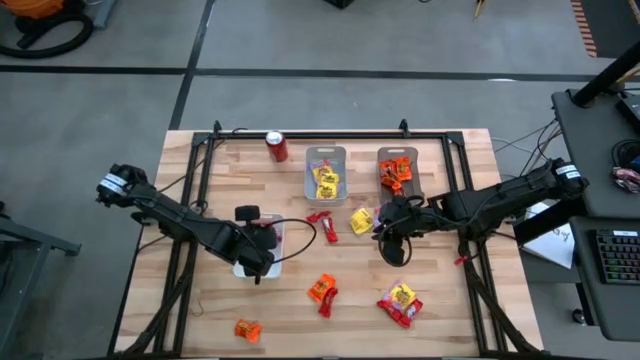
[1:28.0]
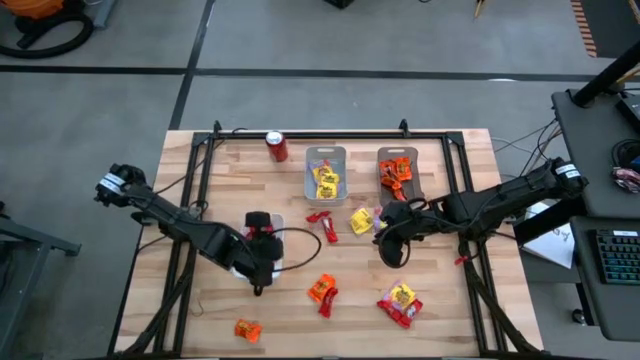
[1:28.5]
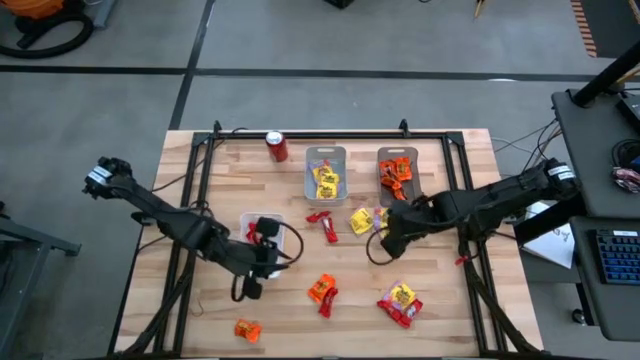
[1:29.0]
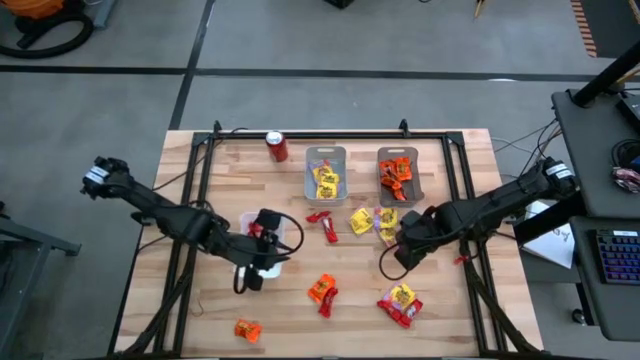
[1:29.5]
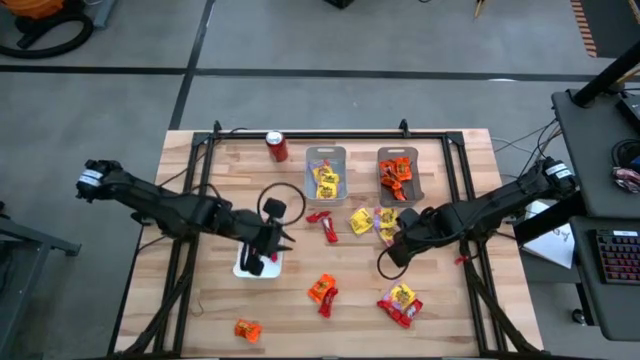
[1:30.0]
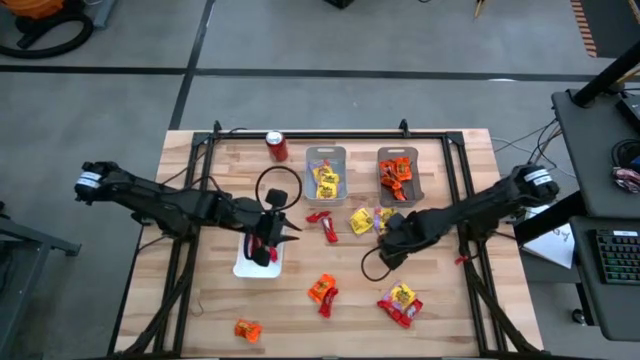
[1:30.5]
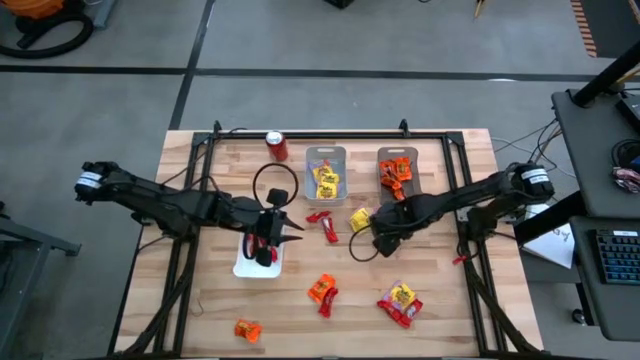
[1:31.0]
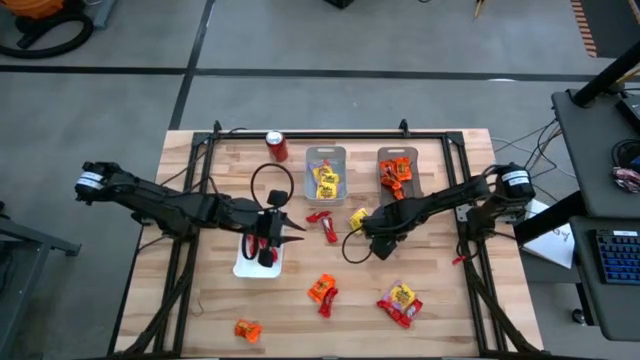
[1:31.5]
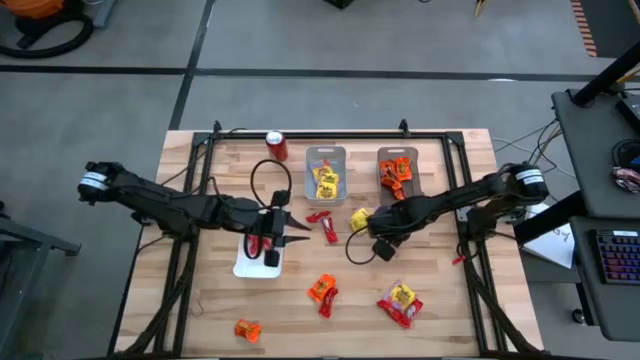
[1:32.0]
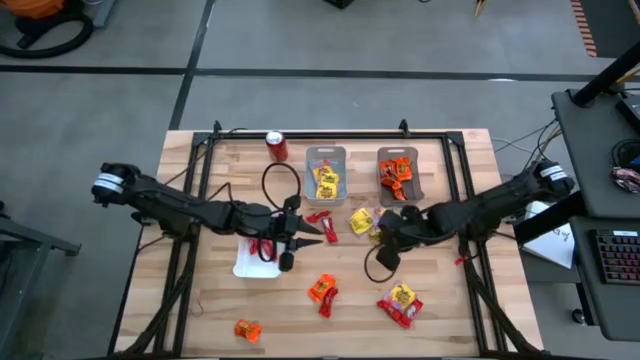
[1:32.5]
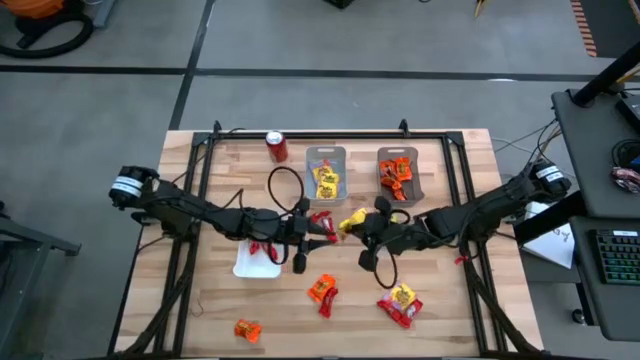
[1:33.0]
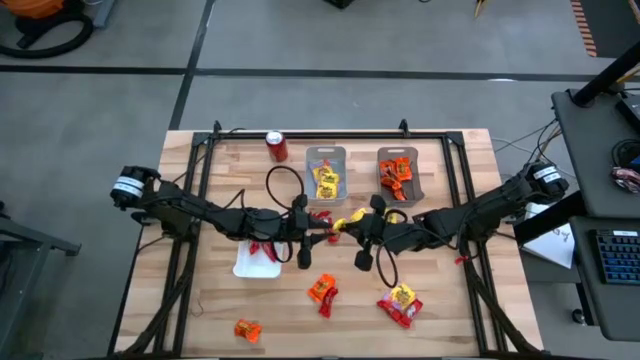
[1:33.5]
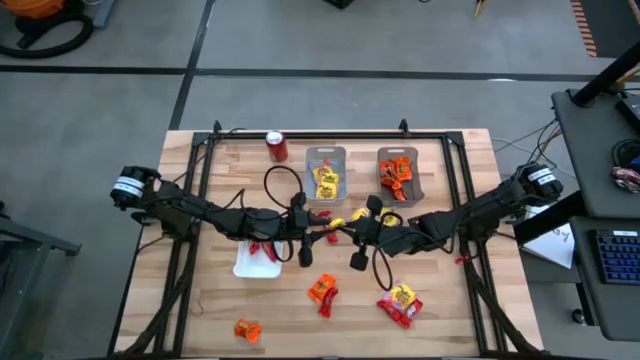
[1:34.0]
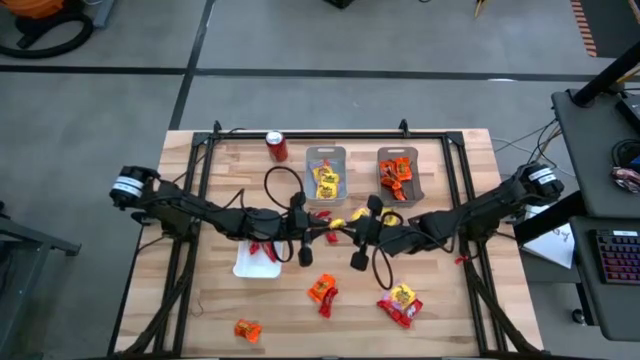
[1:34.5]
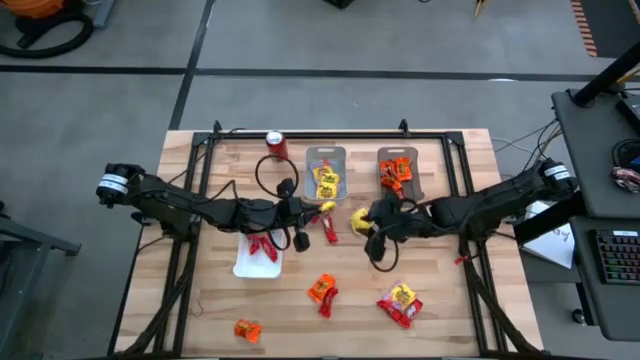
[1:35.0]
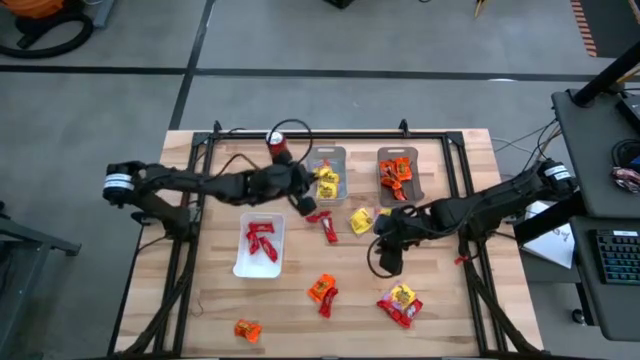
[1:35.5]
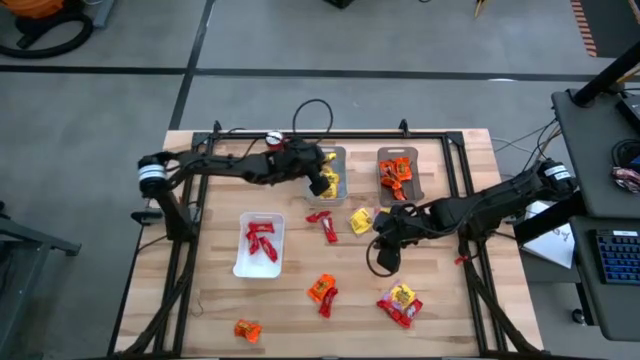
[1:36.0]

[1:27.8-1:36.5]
Task: Sort candy
Put the yellow candy into the gray bin

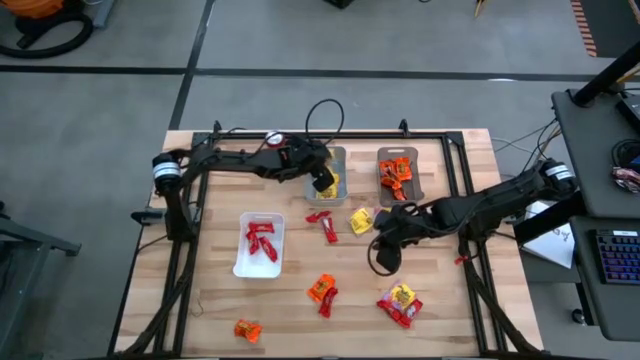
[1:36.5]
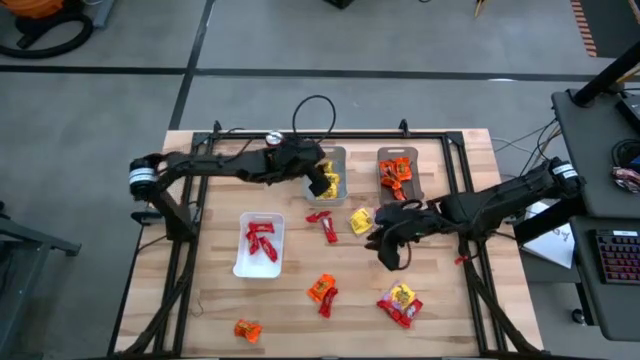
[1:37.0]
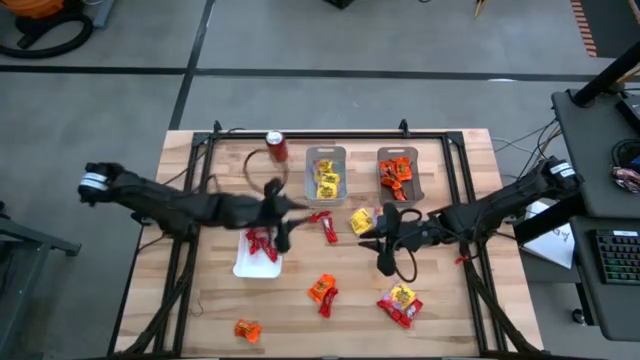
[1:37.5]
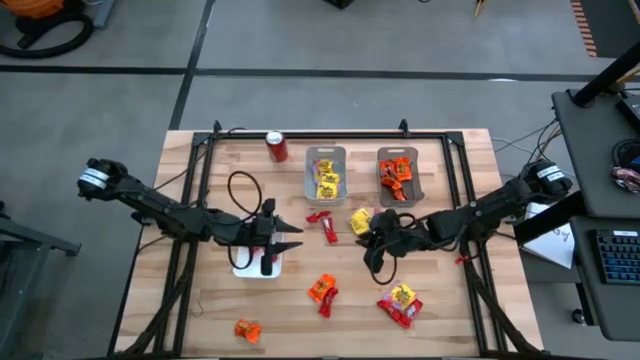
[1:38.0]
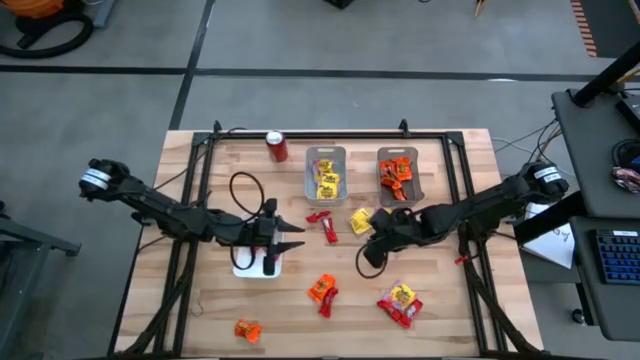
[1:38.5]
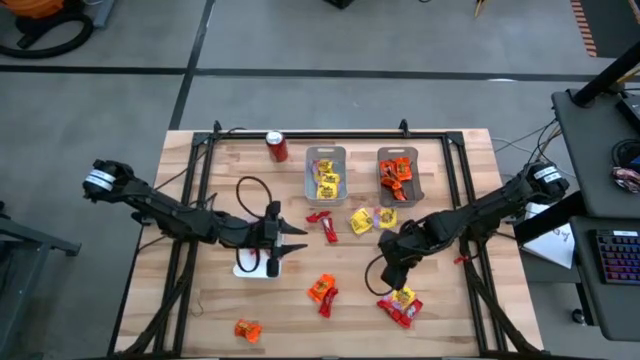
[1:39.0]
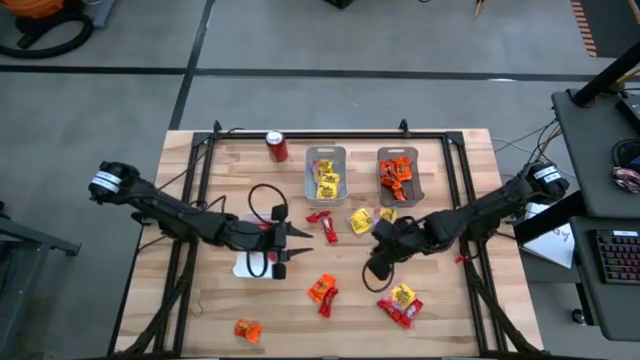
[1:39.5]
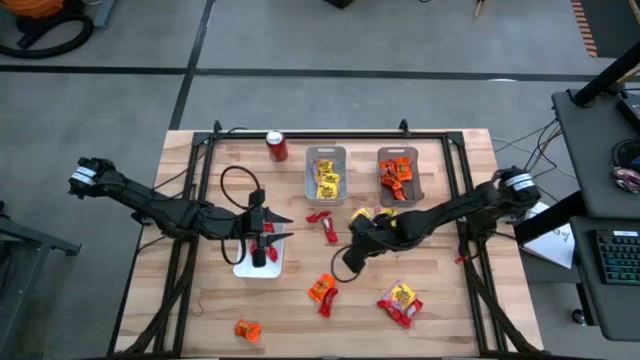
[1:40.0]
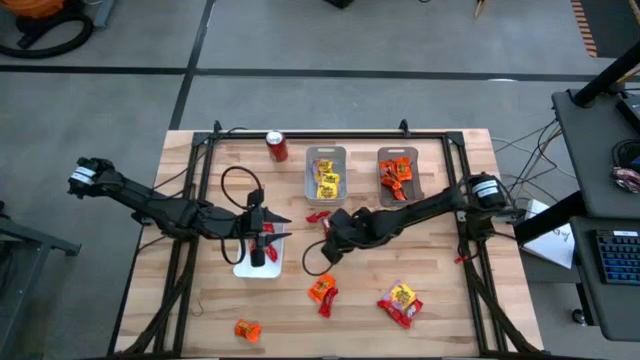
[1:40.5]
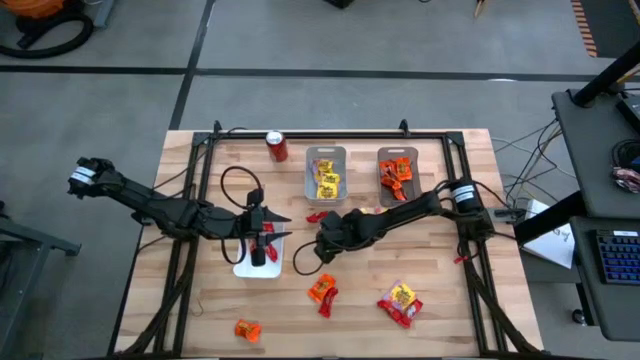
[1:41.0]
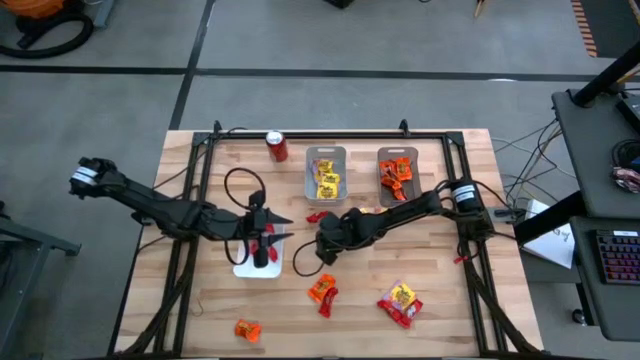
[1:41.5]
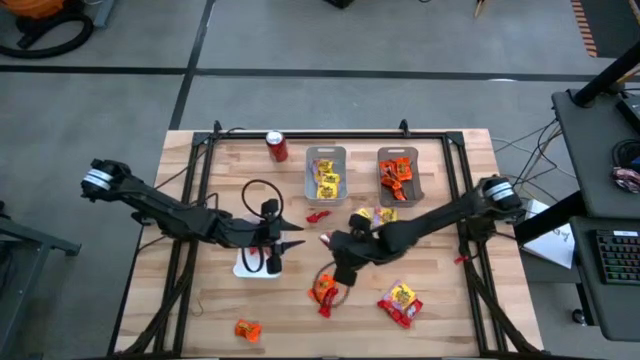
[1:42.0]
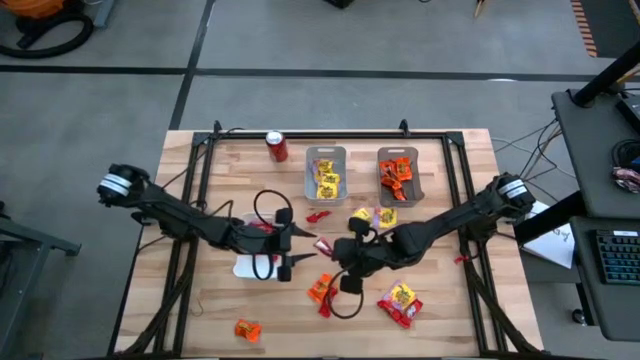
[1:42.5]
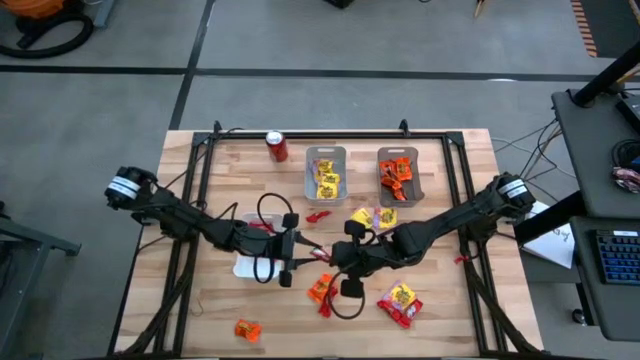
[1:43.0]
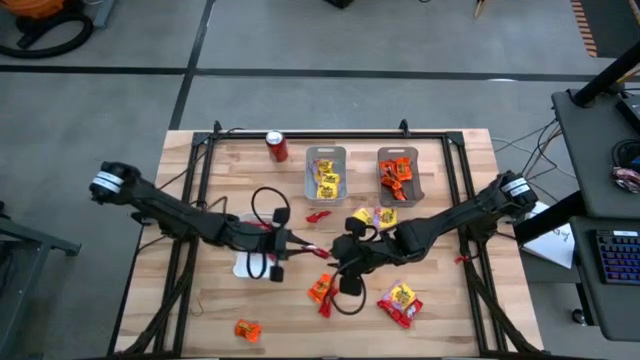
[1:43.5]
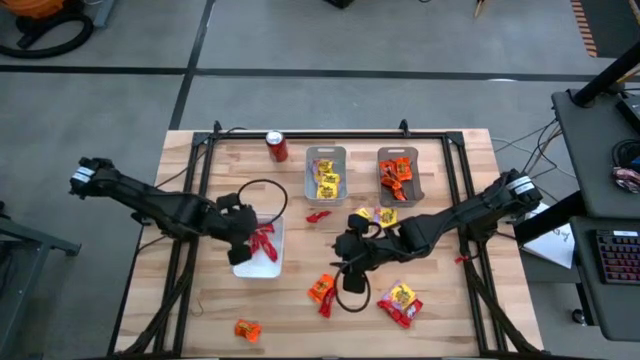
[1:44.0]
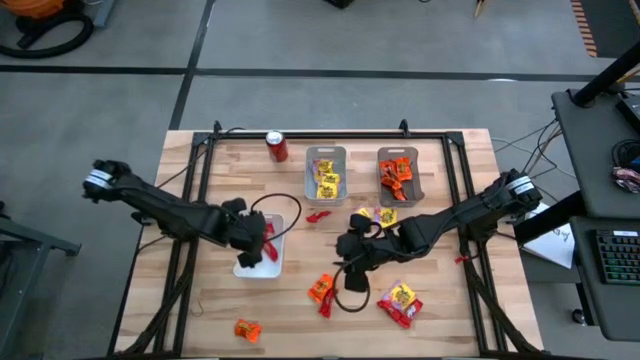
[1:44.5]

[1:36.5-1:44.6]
Put the red candy into the white bin

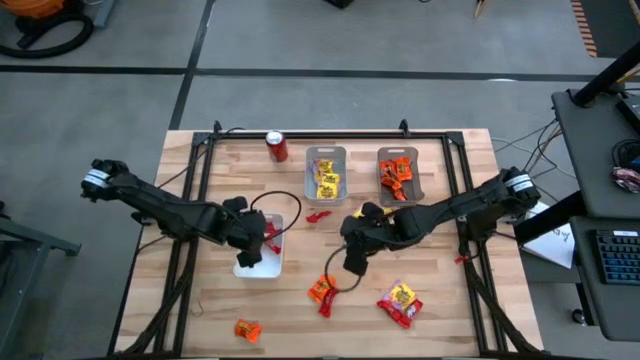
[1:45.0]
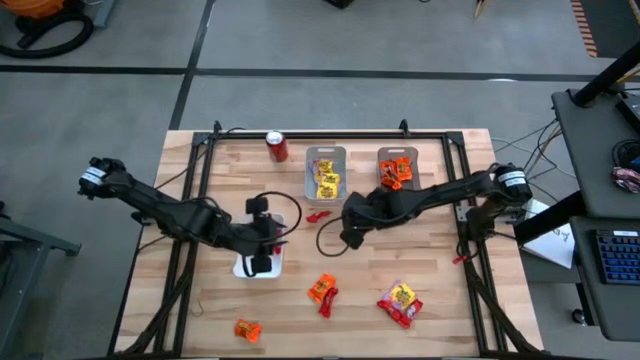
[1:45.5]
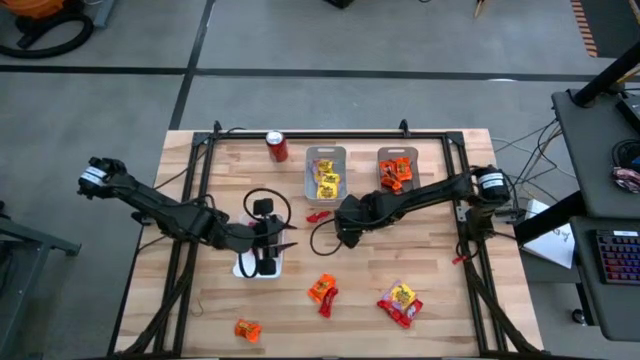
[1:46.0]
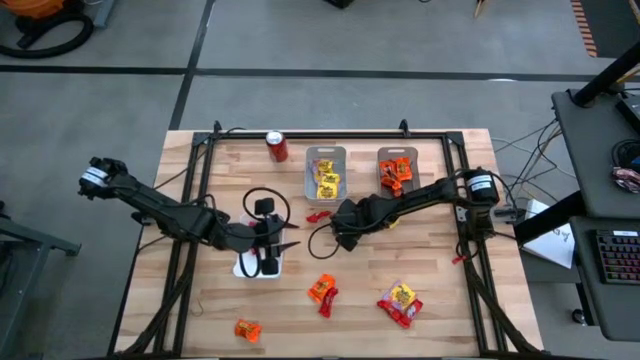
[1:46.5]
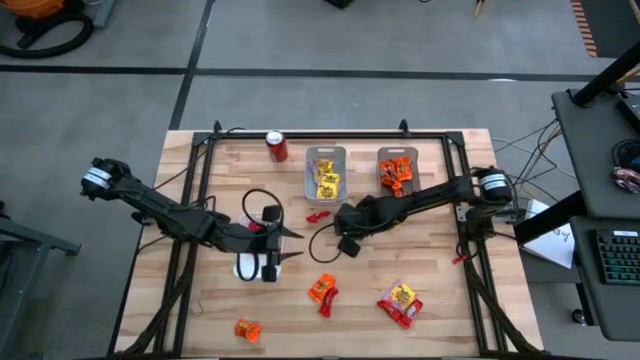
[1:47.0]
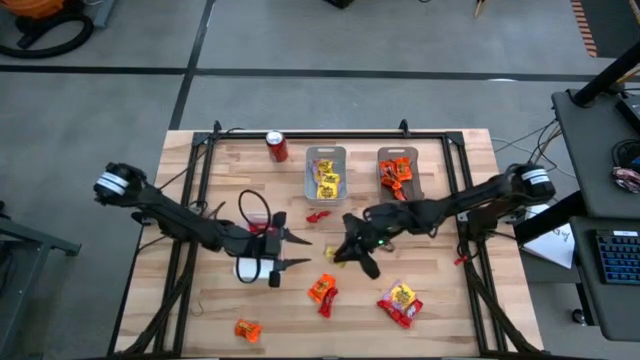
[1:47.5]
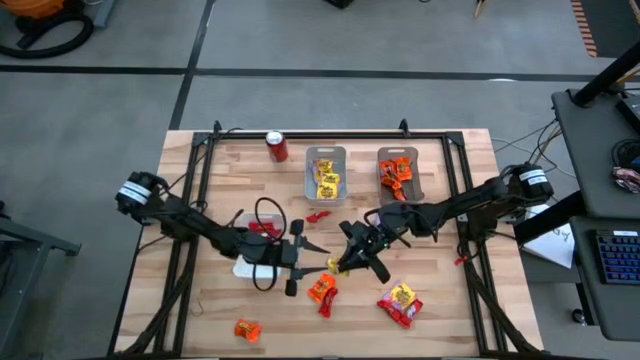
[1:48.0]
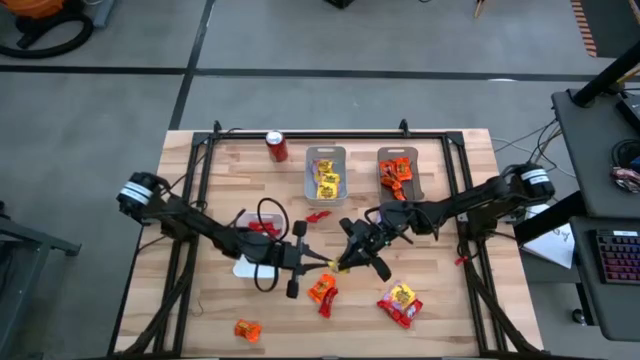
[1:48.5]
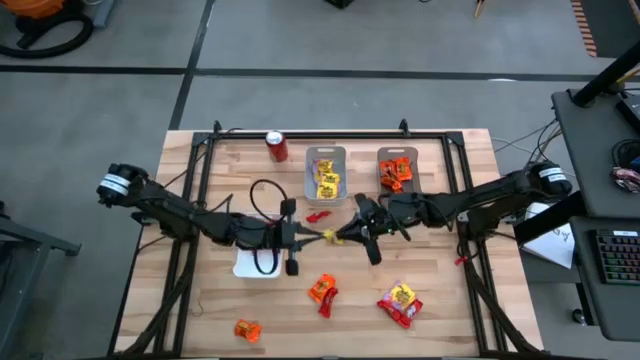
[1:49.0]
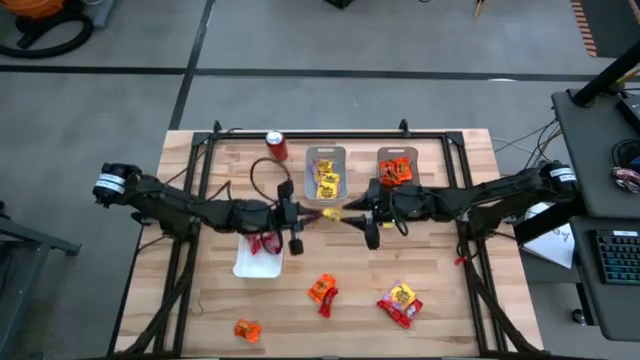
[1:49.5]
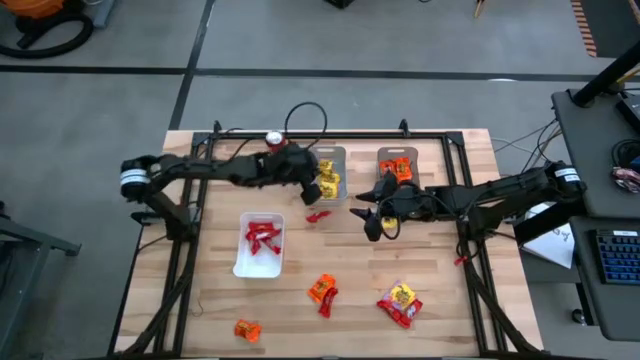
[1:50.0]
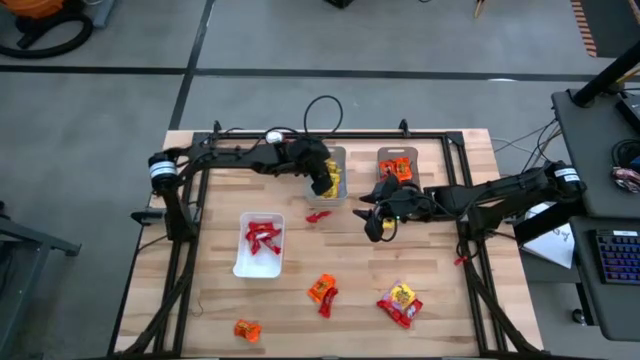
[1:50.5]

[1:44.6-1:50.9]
Put the yellow candy into the gray bin
